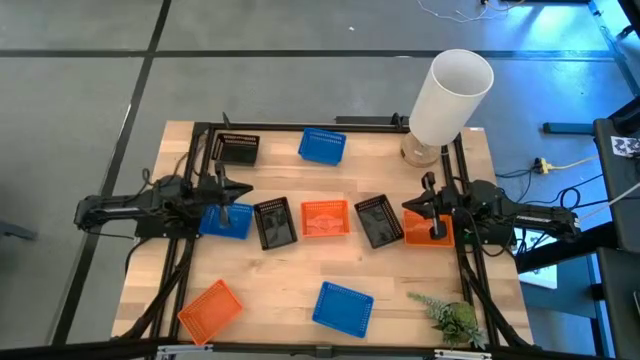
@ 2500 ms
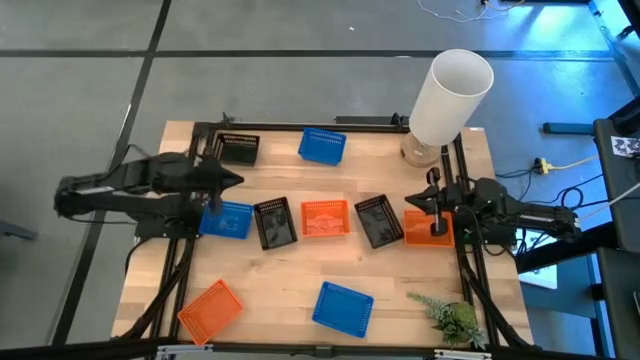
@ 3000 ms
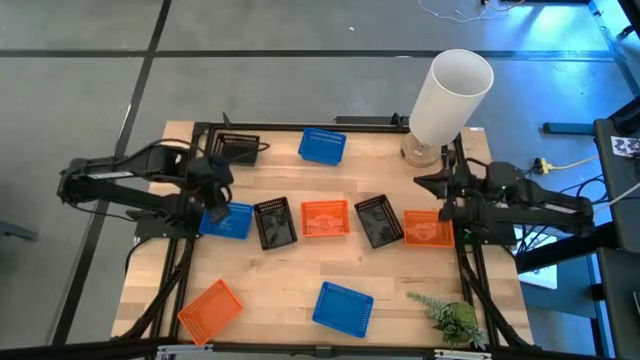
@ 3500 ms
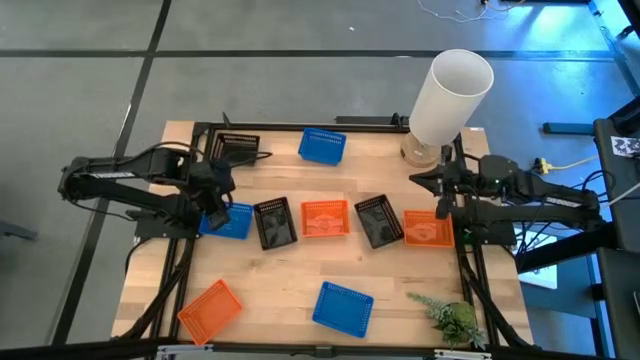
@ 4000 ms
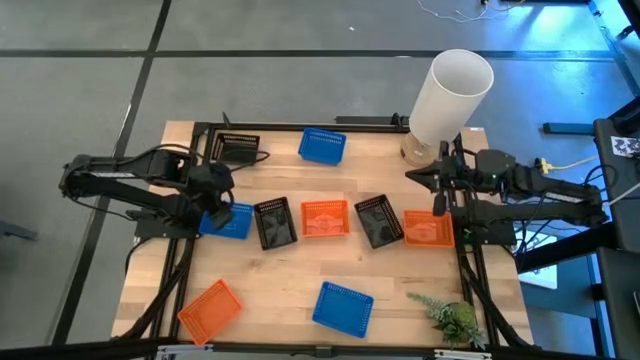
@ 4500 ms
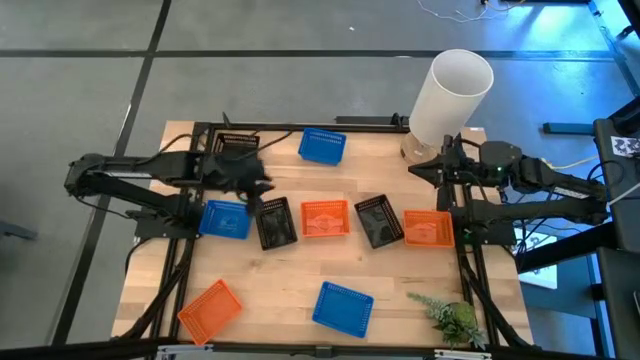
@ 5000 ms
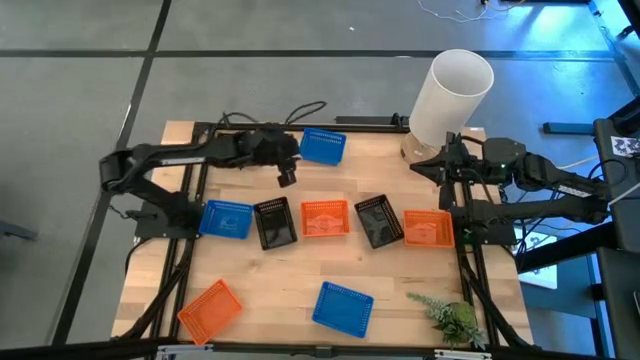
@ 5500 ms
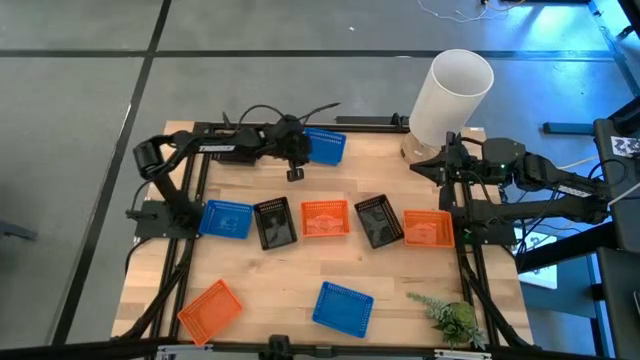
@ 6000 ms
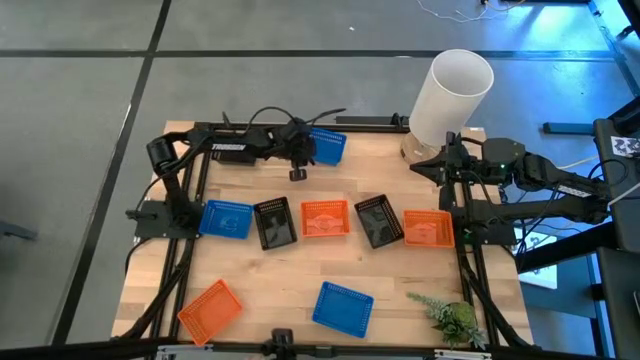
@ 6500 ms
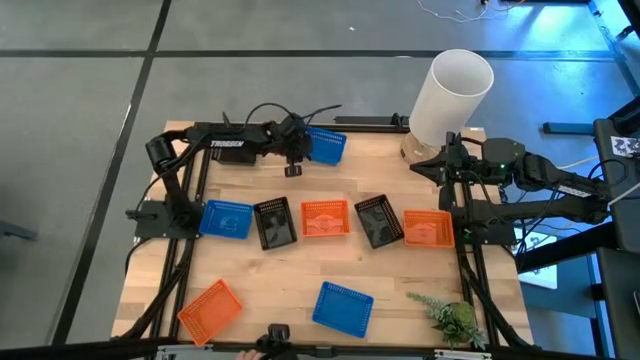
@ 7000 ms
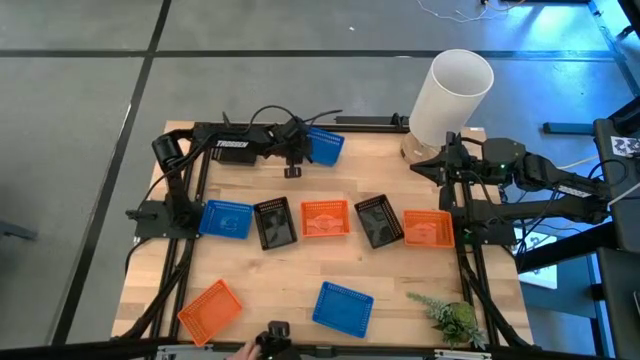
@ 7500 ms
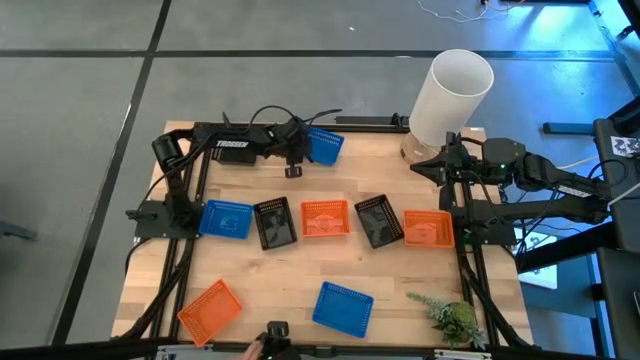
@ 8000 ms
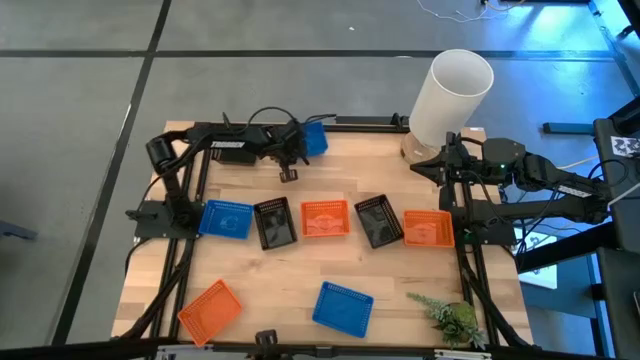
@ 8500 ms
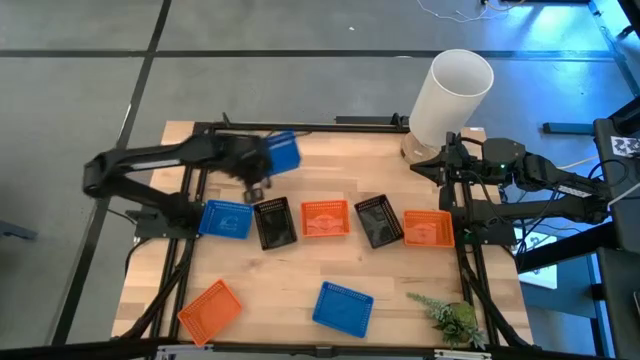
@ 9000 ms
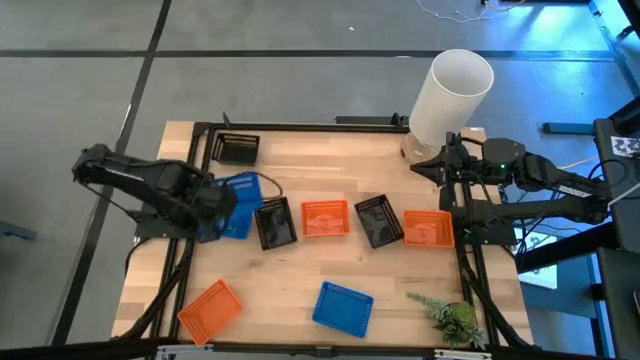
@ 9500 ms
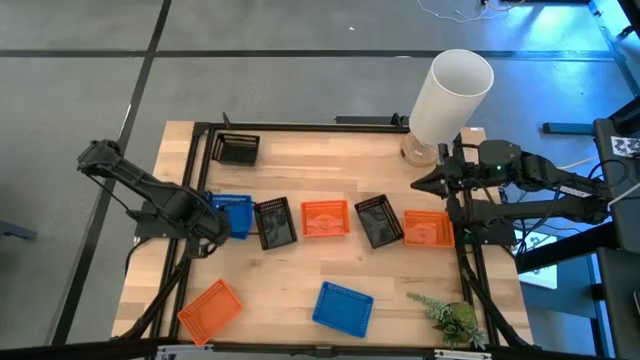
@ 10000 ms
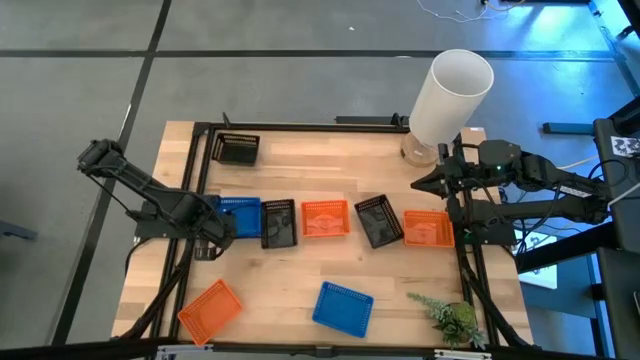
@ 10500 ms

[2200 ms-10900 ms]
Stack the top right blue bin on the middle left blue bin

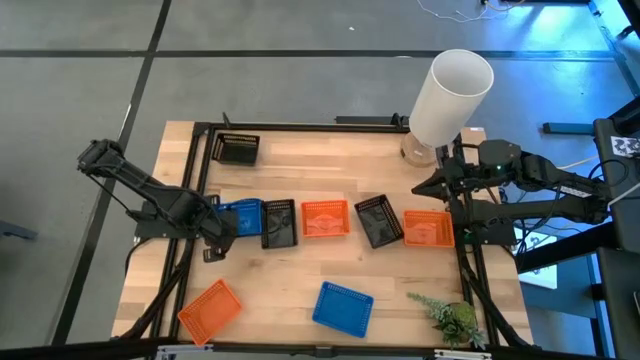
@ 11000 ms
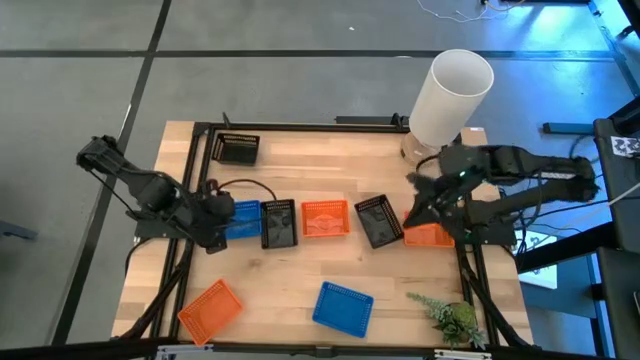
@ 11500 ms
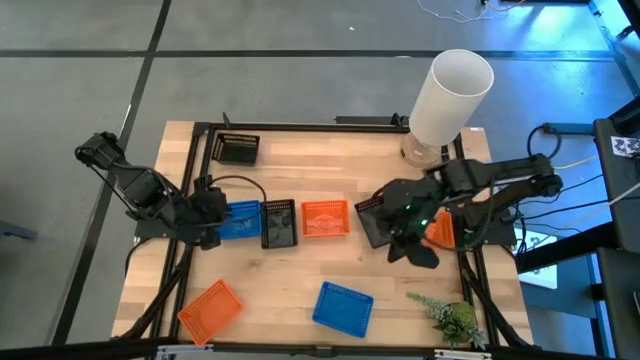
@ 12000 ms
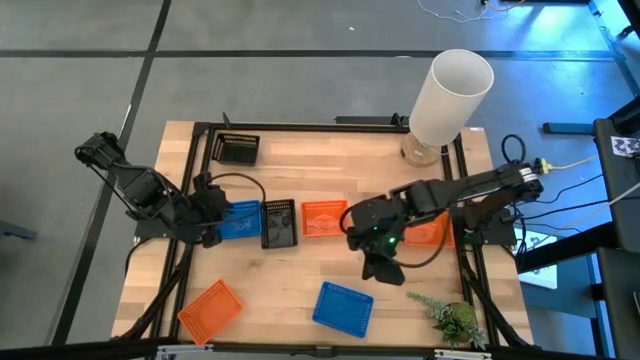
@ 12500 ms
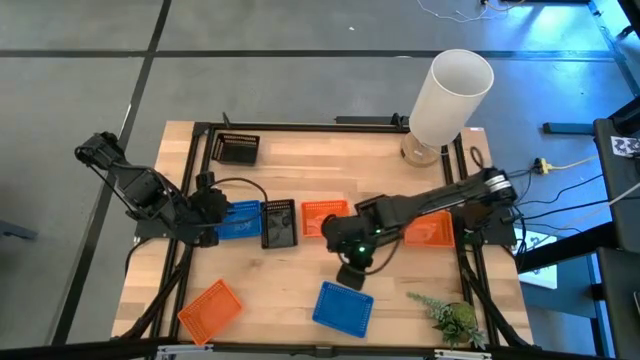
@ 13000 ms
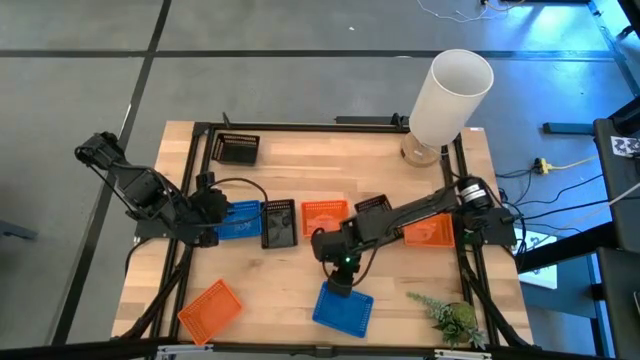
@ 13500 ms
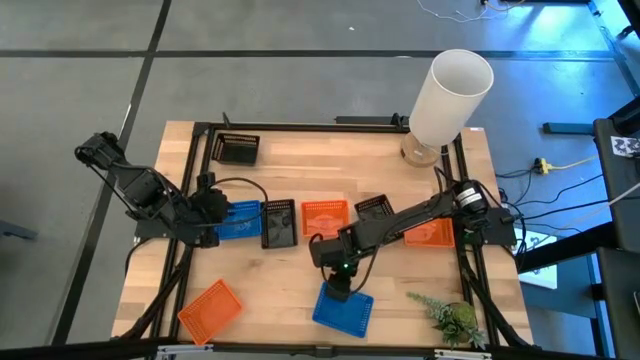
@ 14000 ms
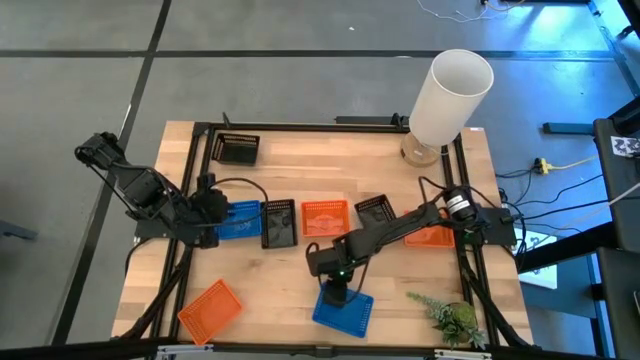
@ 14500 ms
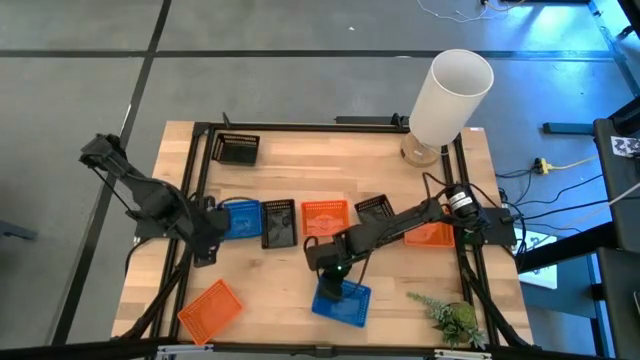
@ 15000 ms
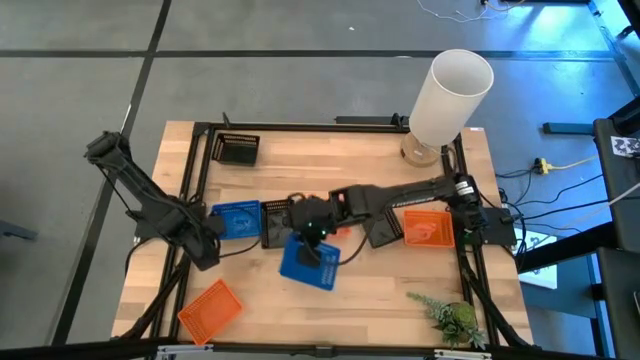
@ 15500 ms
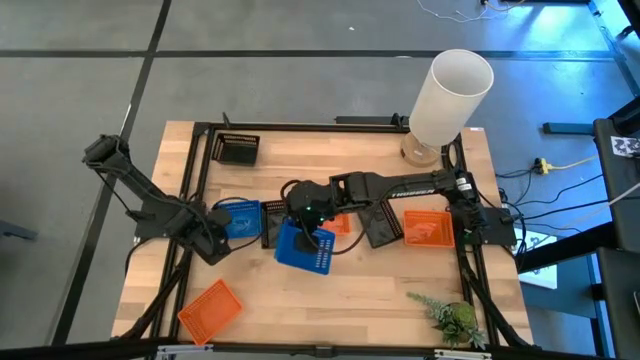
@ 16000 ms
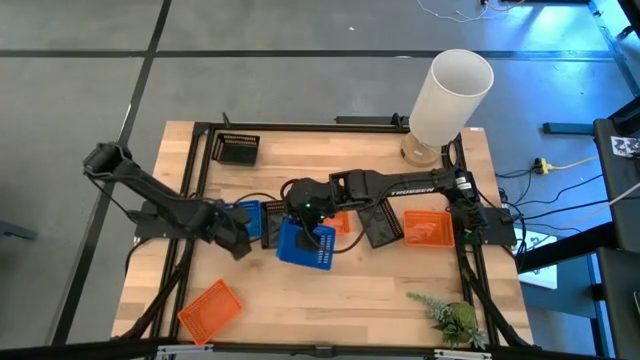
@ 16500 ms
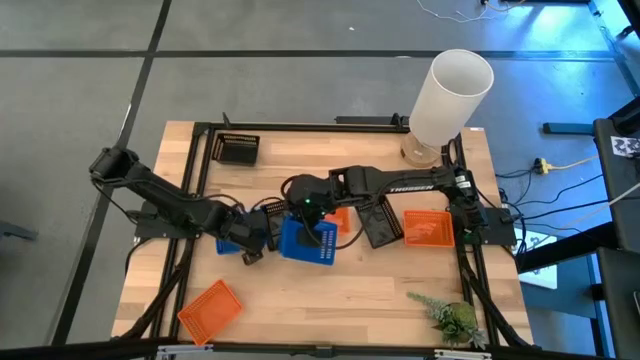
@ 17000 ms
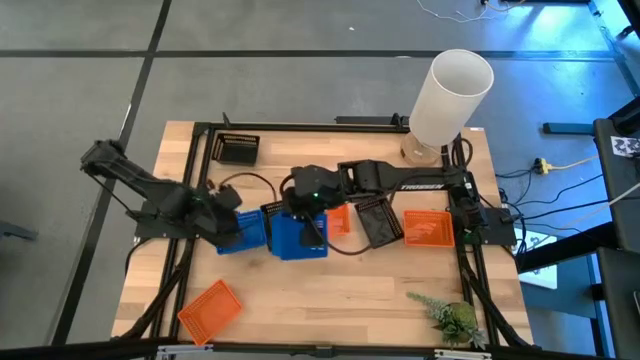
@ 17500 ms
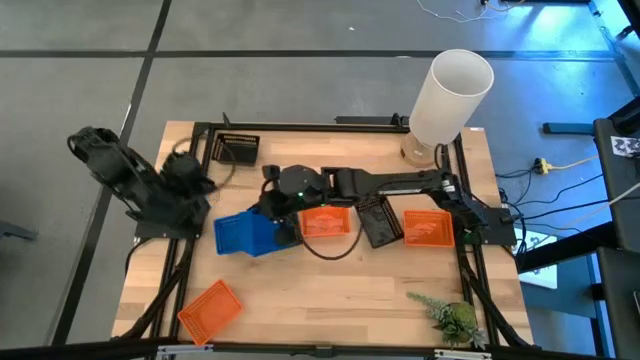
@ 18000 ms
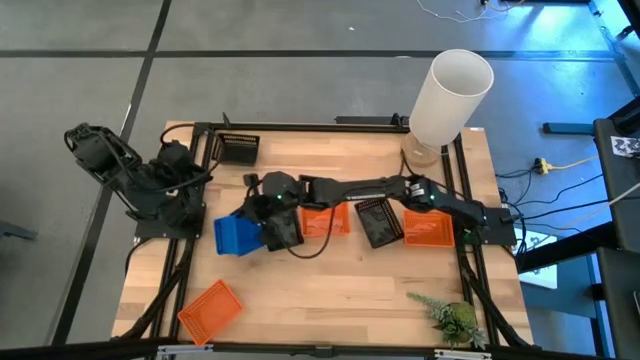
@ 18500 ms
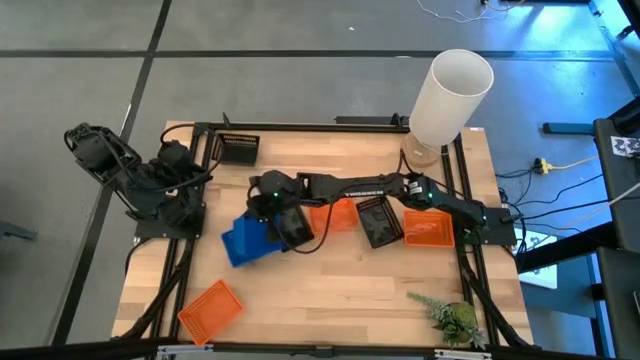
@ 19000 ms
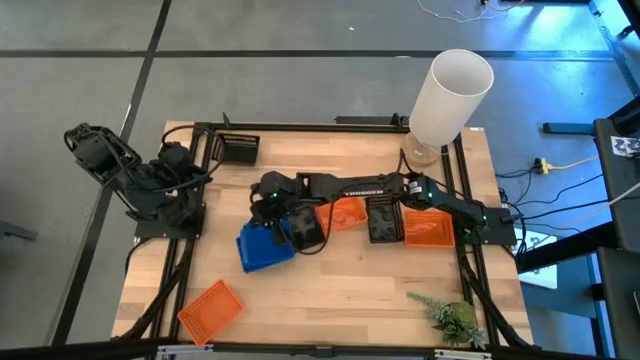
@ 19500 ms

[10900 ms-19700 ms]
Stack the bottom blue bin on the stacked blue bins
